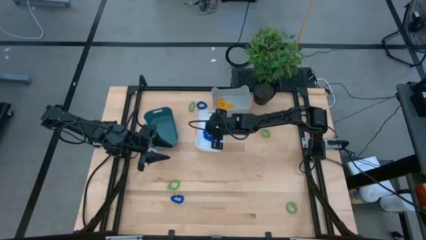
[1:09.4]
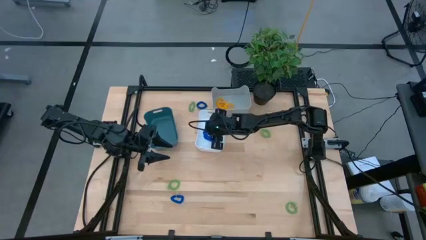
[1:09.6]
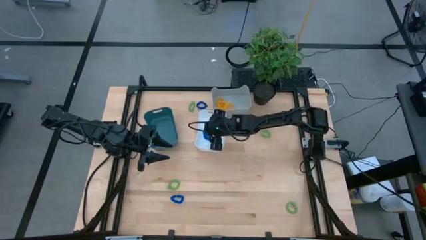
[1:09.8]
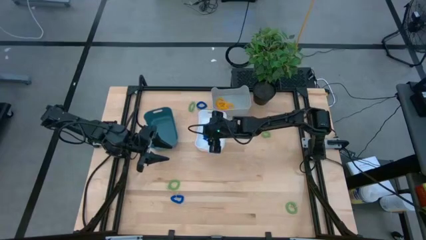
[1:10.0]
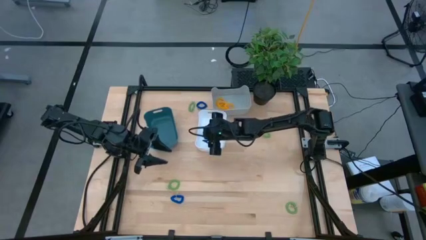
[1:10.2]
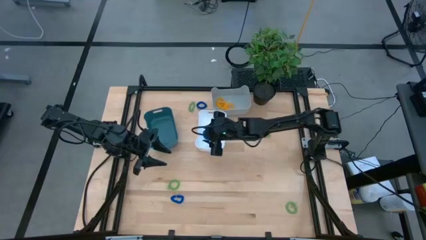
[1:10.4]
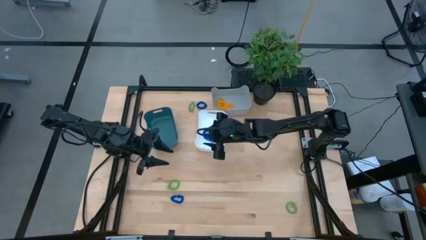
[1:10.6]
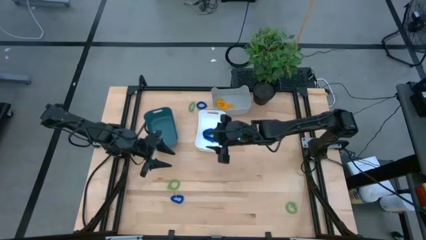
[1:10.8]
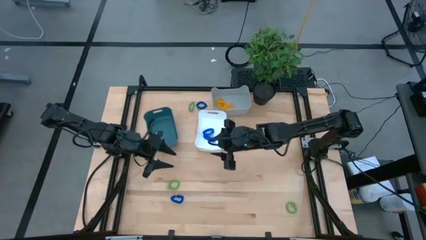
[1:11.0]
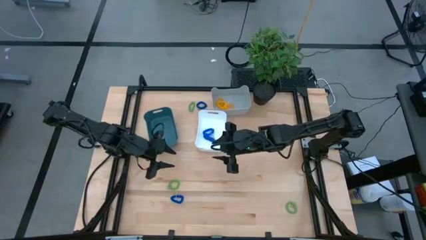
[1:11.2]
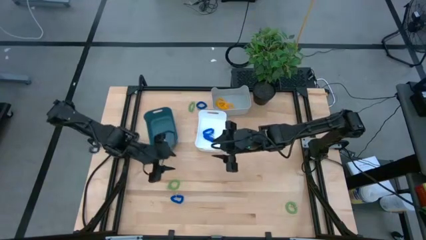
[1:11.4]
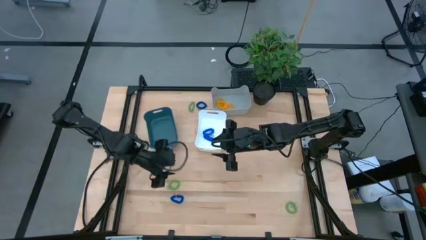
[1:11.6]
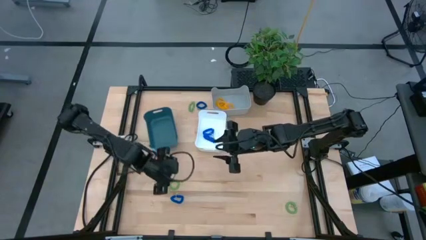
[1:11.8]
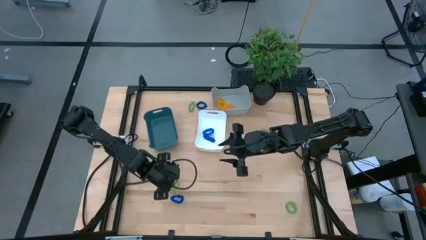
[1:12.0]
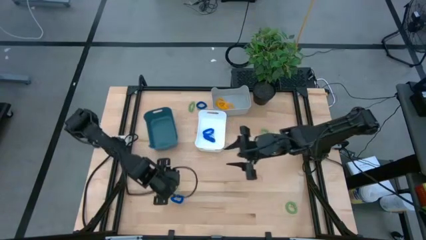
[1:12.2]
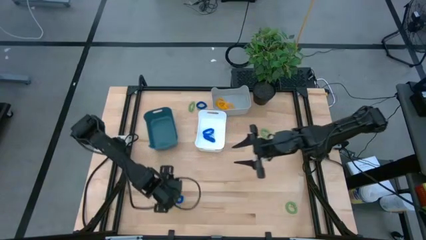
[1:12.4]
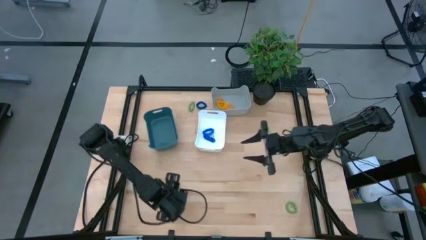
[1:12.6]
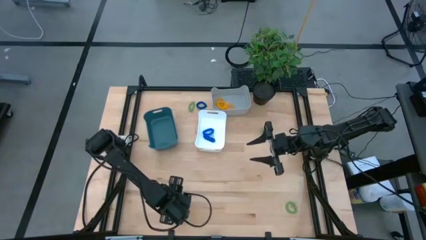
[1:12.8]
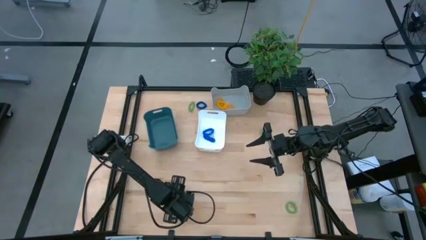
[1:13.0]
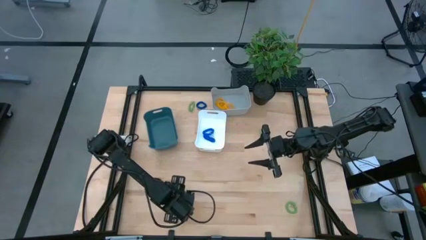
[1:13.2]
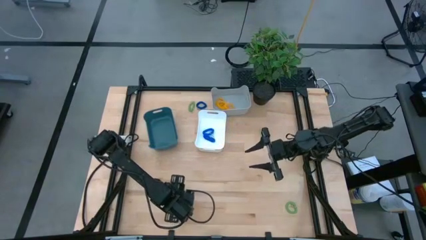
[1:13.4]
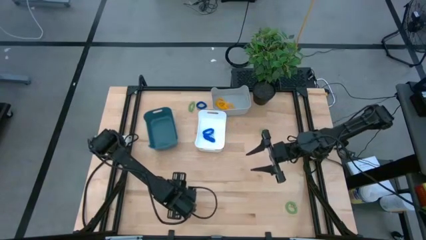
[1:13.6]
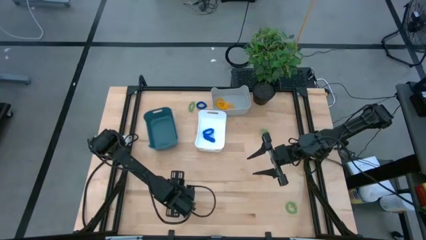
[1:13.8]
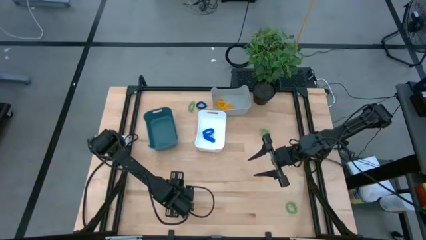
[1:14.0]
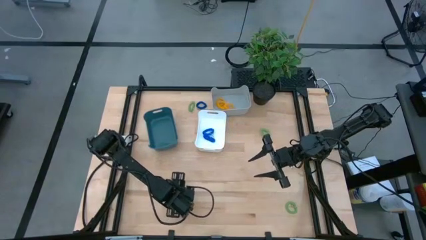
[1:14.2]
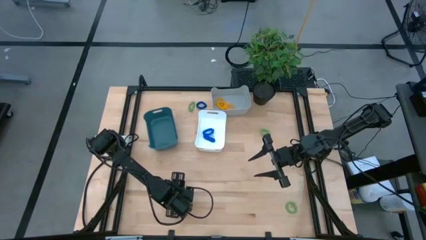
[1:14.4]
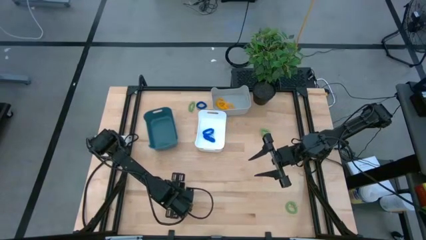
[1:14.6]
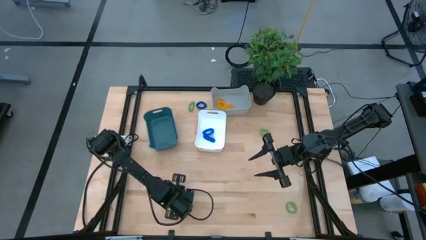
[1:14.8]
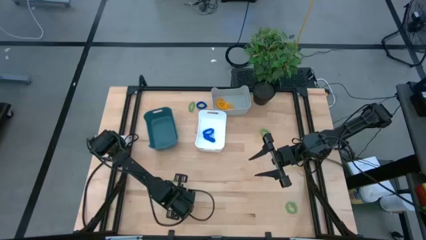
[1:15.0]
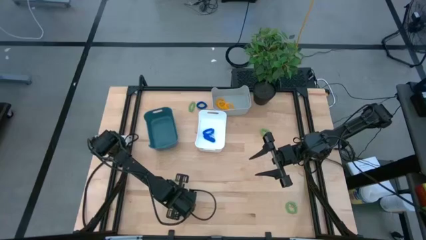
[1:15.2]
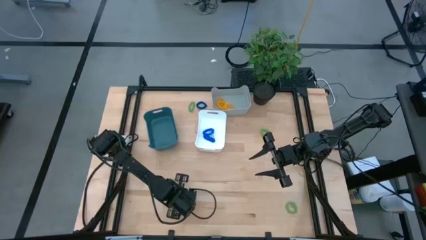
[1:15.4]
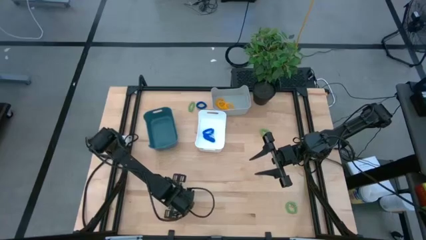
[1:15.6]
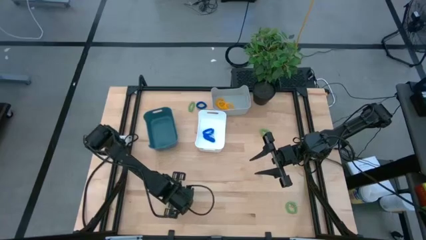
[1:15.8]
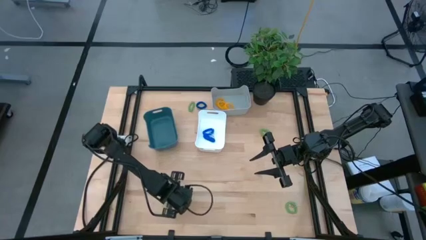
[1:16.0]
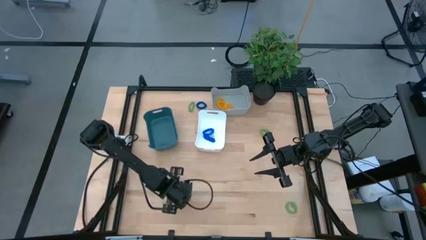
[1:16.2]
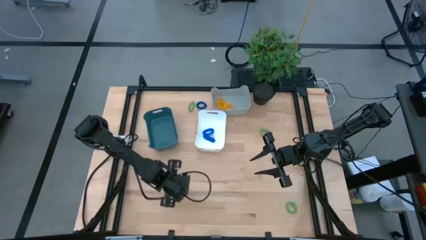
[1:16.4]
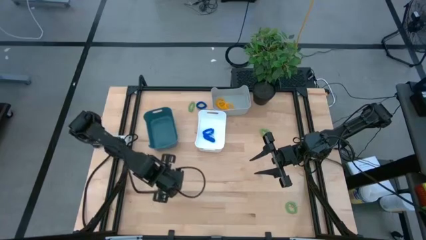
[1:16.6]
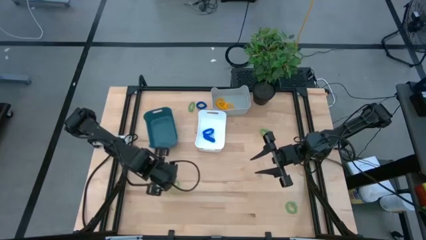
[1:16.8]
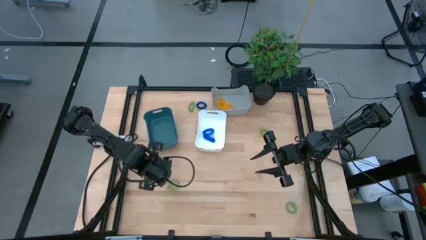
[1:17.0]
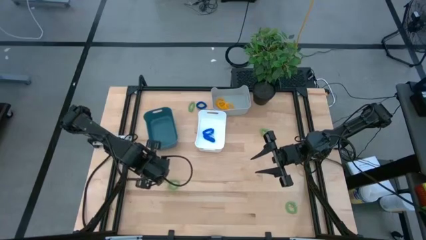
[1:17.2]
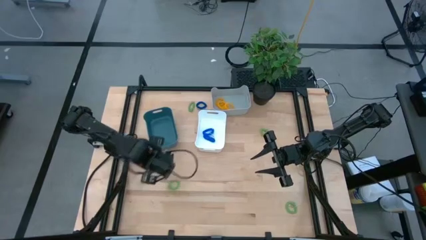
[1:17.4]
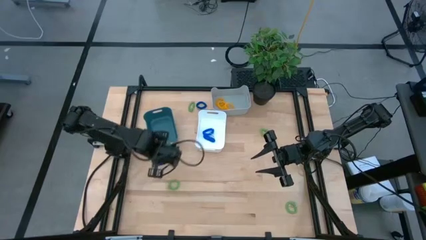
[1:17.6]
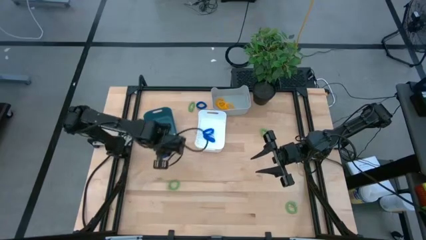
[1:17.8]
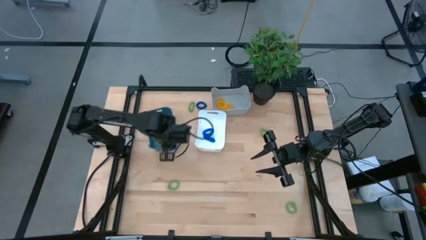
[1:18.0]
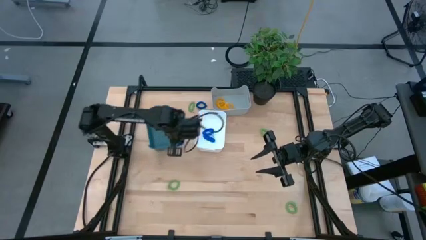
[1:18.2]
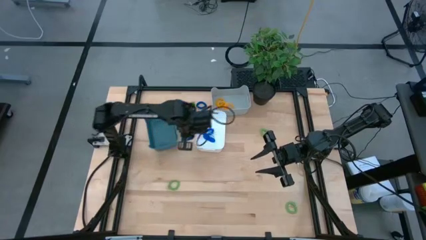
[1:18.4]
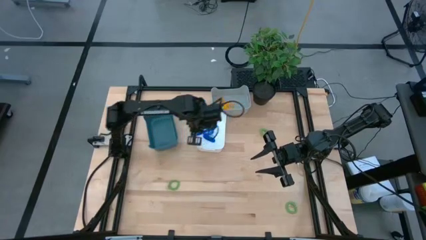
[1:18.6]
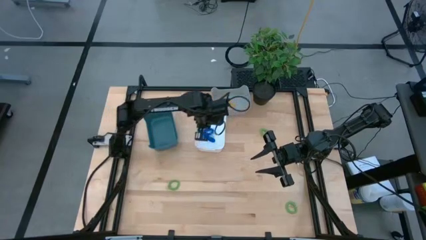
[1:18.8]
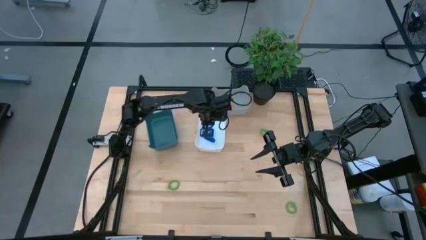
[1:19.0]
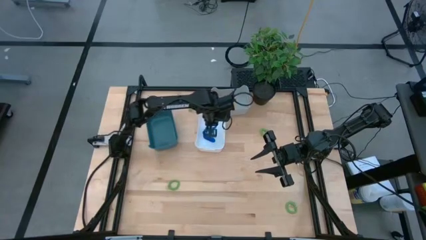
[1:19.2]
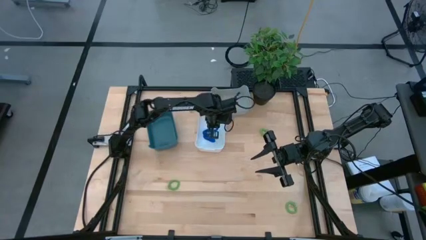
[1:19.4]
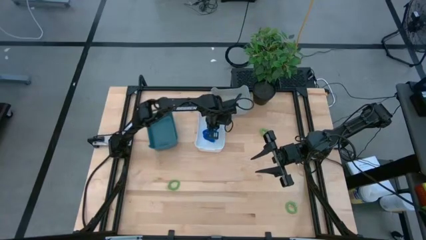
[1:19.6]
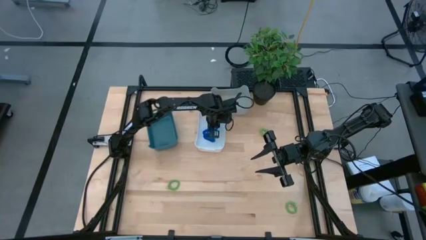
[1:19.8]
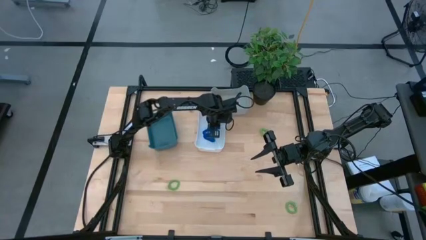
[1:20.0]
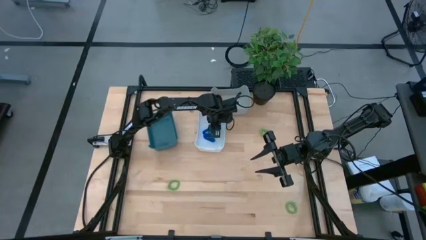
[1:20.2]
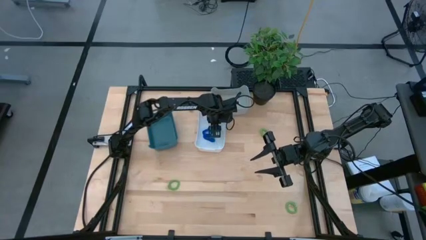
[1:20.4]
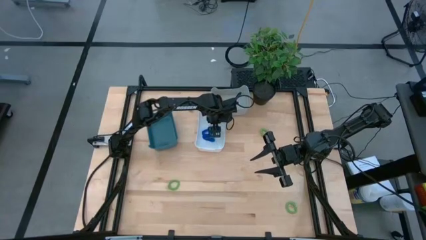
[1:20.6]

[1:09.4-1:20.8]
Task: Sort spring keychains
Put the blue spring keychain into the white bin

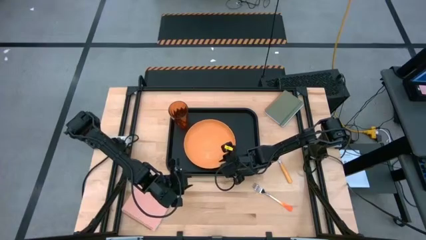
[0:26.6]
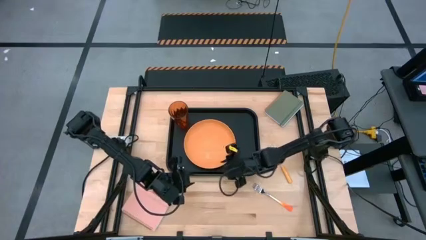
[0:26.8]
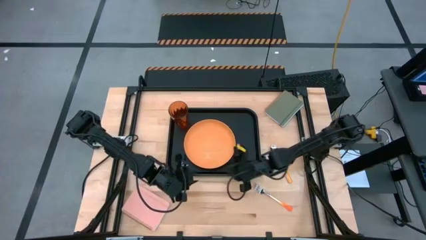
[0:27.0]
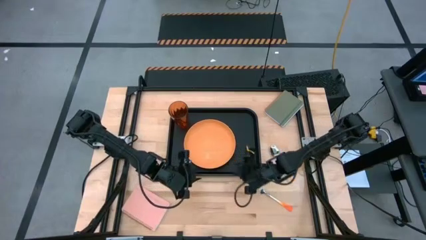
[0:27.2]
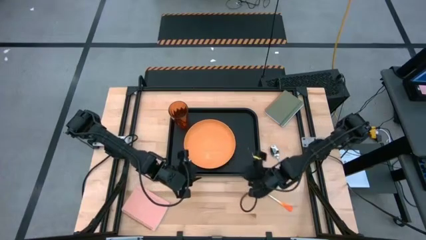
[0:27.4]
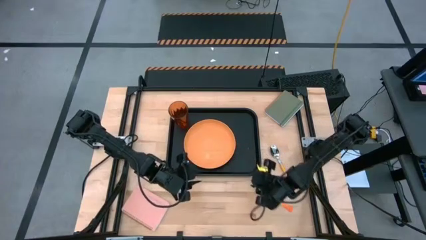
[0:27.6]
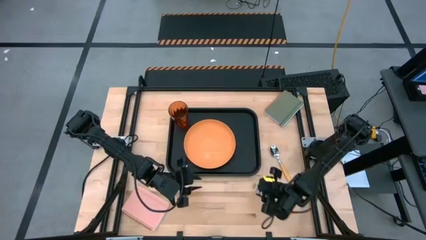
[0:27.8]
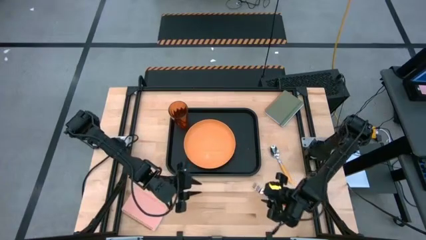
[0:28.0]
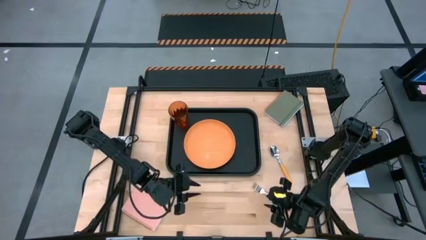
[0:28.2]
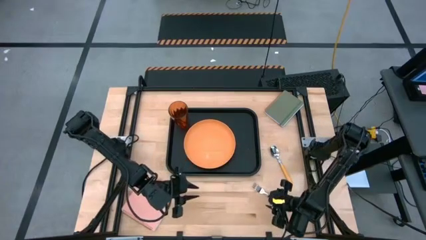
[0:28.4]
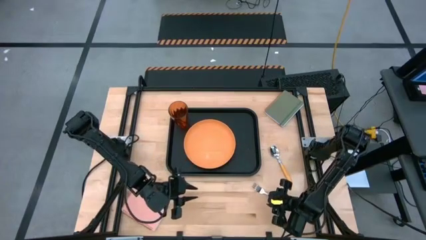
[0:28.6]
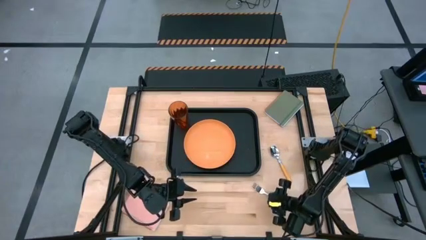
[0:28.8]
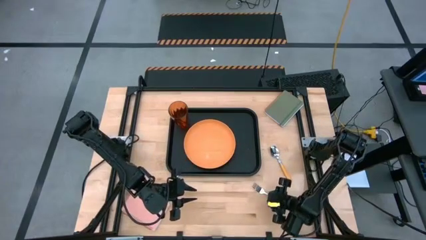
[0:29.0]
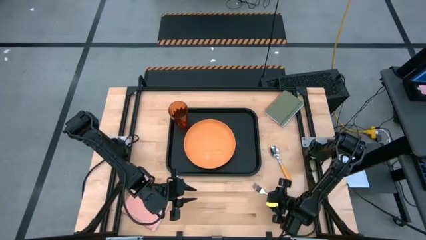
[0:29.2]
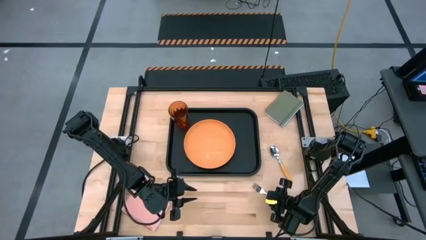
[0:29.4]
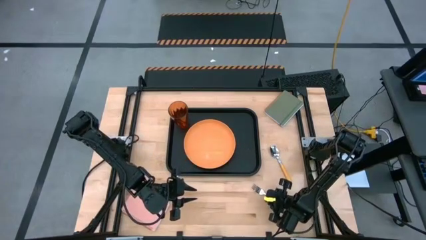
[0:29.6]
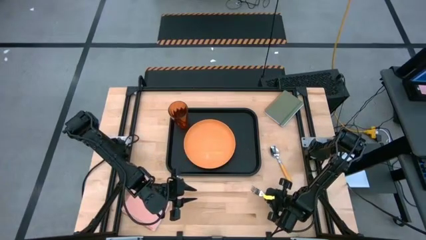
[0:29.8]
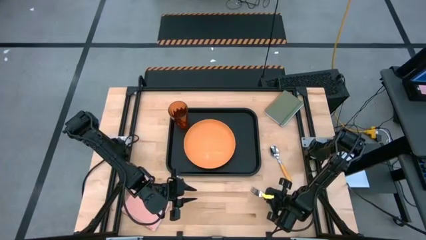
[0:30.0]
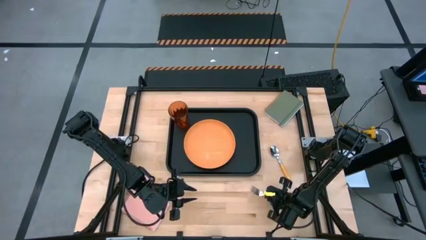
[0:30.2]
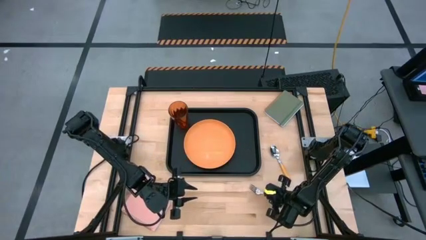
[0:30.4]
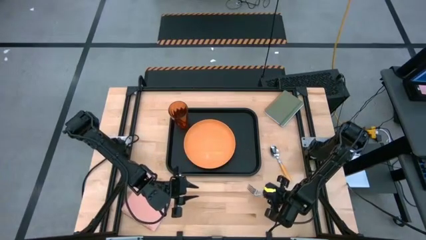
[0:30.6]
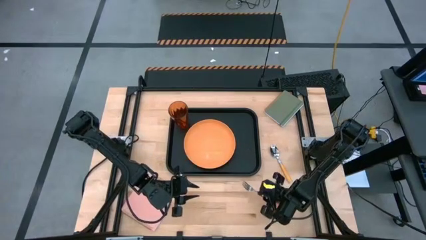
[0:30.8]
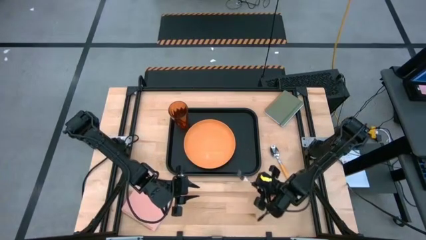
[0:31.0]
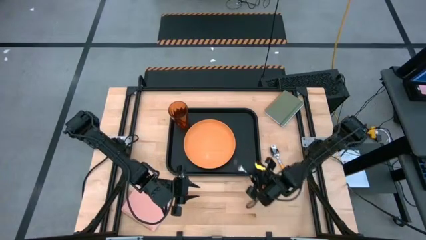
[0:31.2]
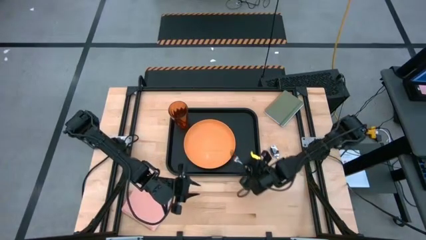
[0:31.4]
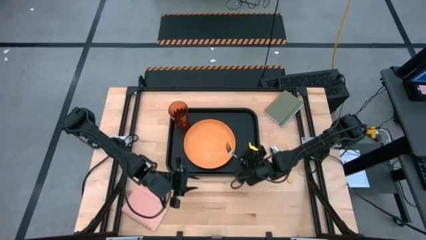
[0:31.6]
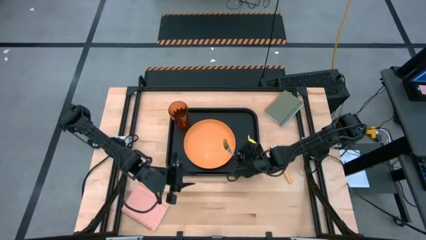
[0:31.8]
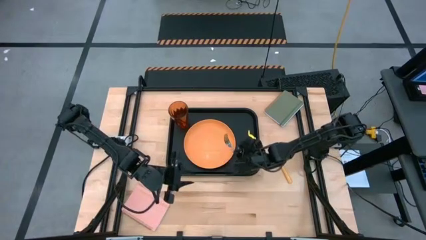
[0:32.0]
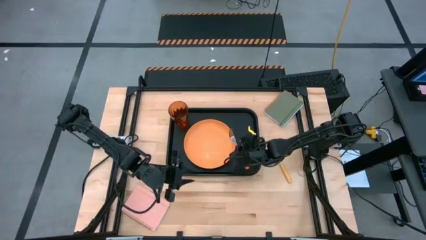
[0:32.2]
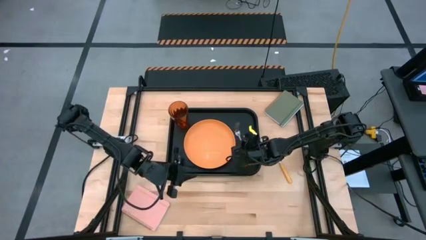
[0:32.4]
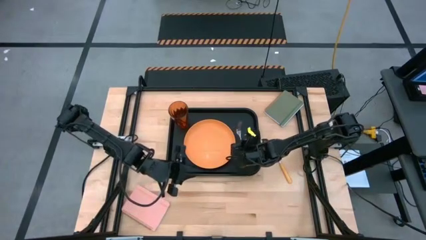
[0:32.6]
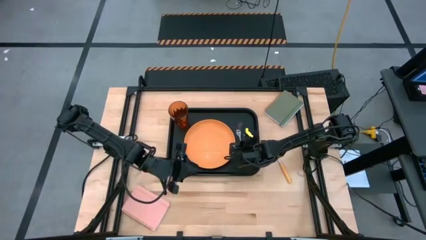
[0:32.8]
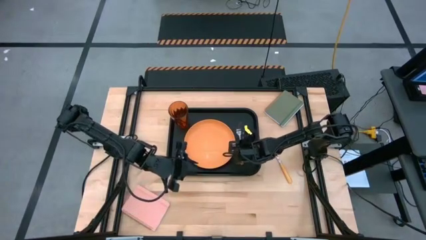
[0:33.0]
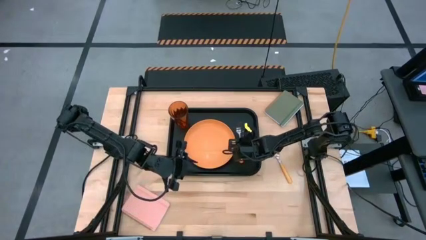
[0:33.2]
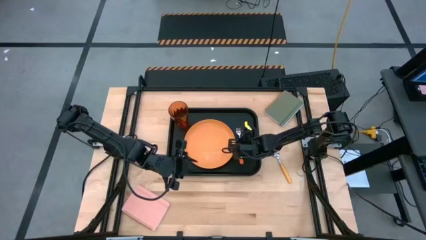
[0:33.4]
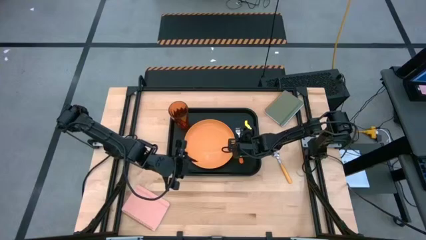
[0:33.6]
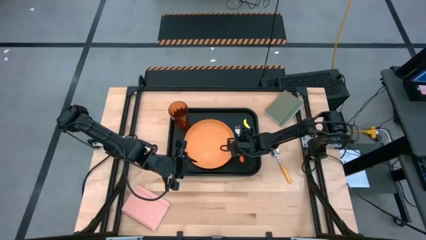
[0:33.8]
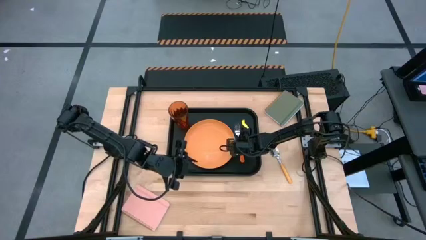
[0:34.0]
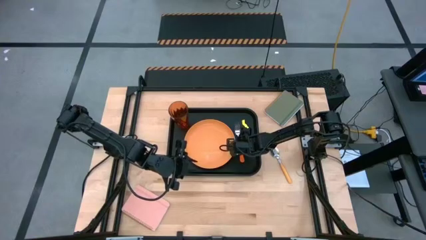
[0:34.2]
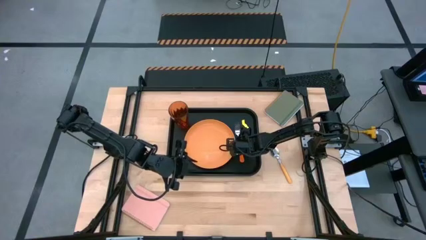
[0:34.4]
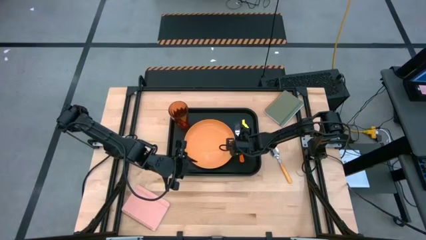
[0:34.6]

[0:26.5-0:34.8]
Task: Pick and place plate/cup/fork/spoon on tray
Put the orange fork on the black tray to the right side of the orange plate
